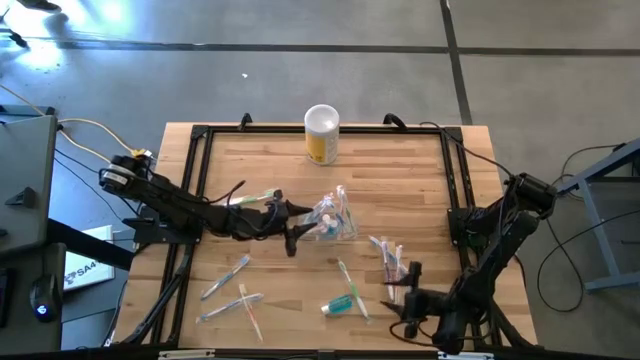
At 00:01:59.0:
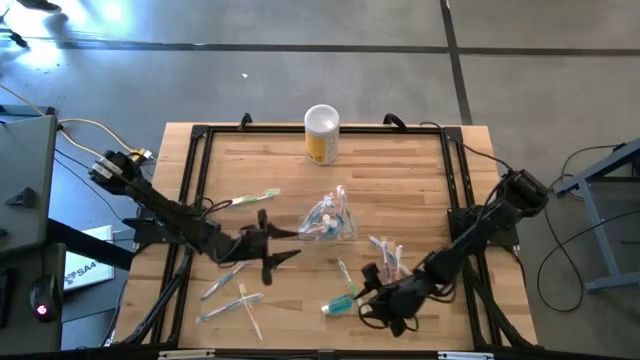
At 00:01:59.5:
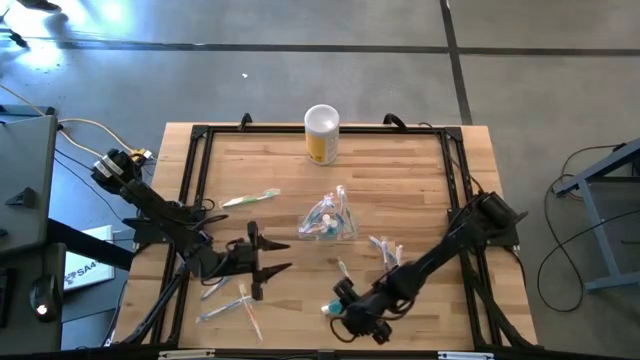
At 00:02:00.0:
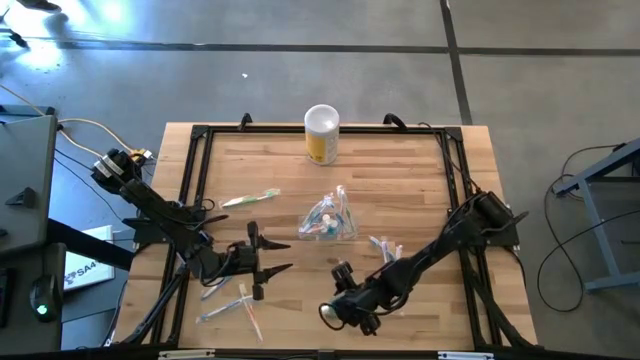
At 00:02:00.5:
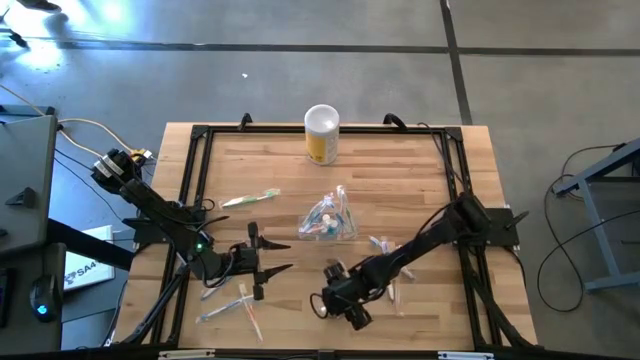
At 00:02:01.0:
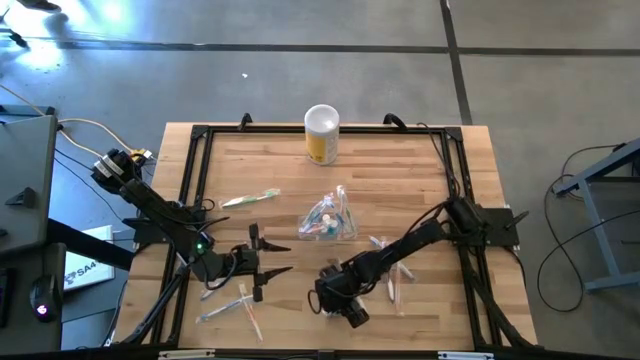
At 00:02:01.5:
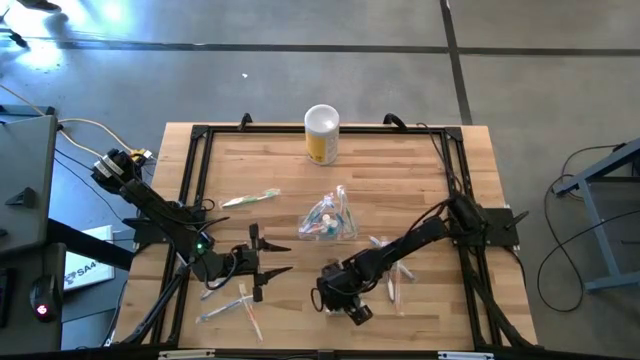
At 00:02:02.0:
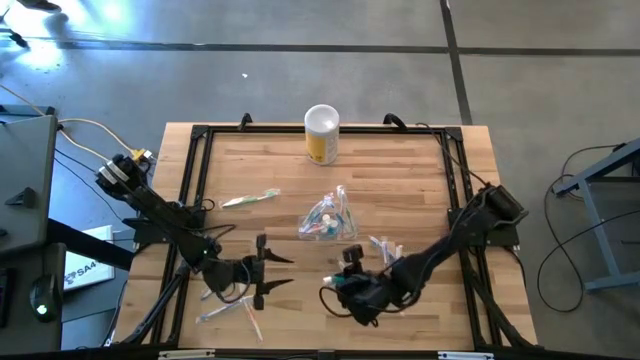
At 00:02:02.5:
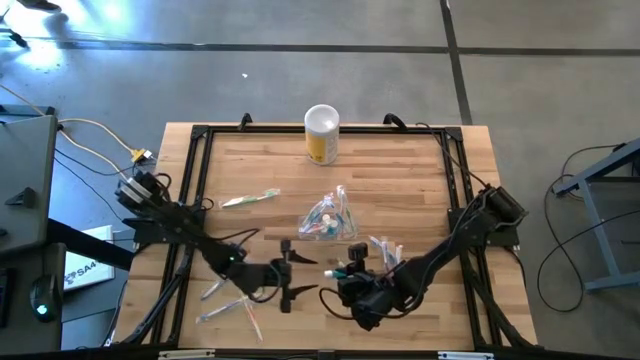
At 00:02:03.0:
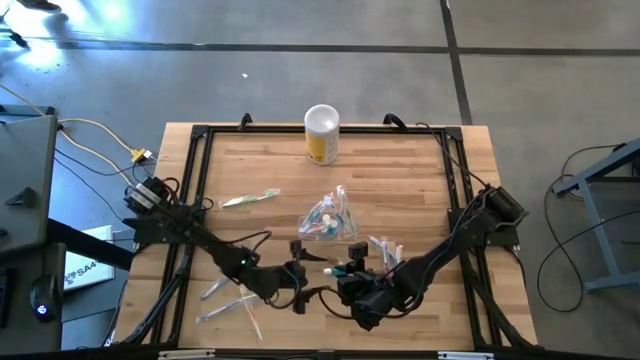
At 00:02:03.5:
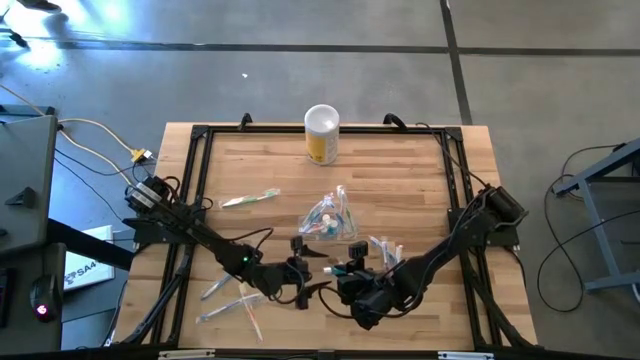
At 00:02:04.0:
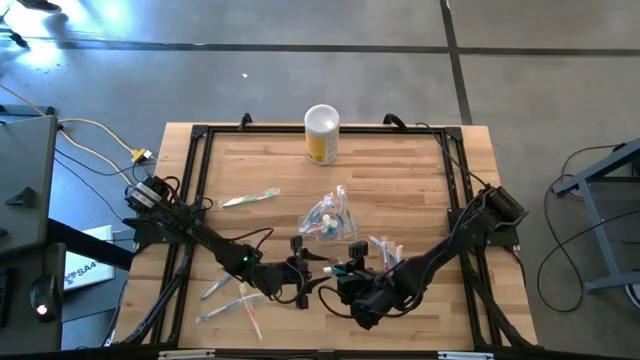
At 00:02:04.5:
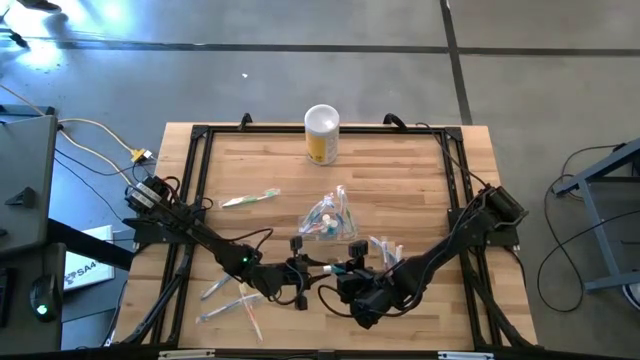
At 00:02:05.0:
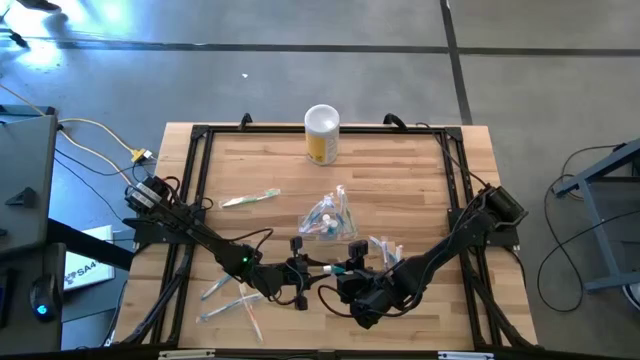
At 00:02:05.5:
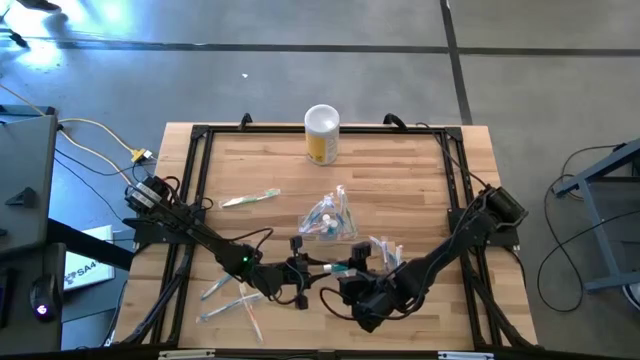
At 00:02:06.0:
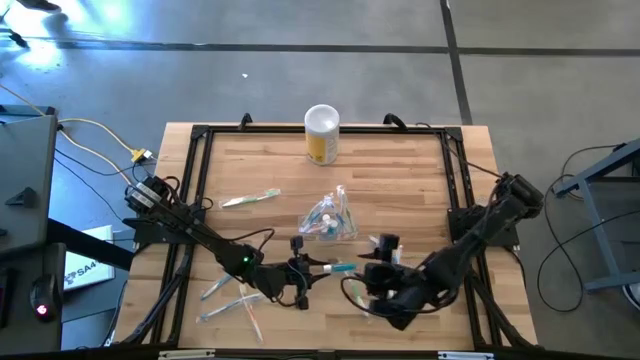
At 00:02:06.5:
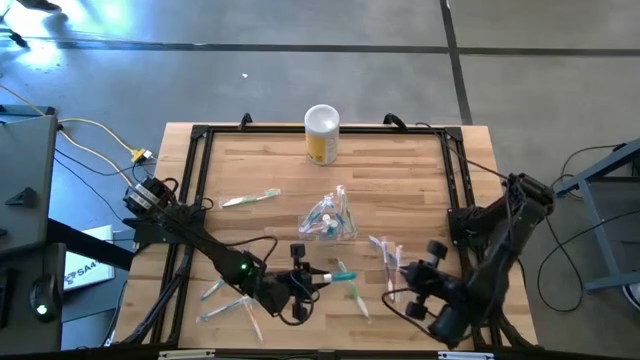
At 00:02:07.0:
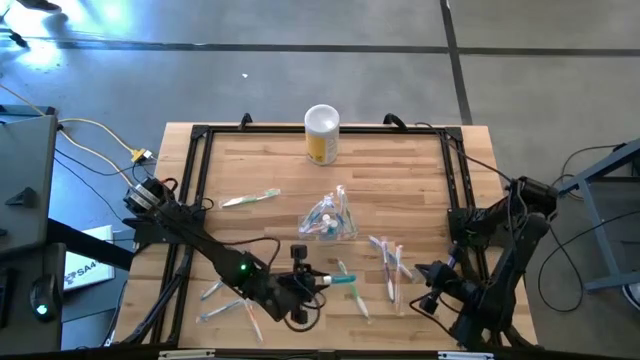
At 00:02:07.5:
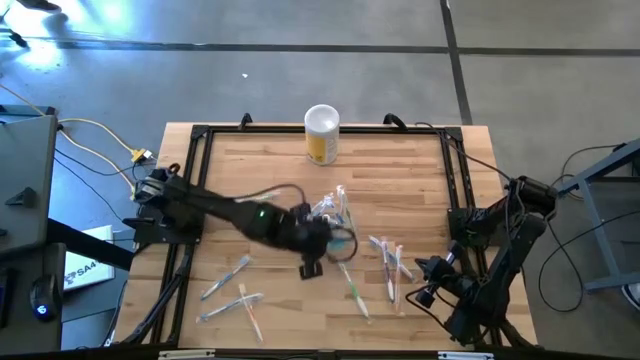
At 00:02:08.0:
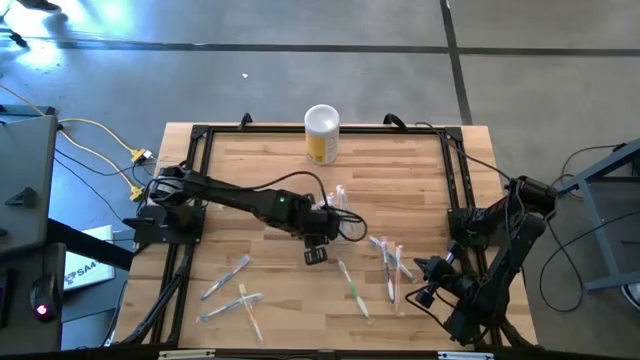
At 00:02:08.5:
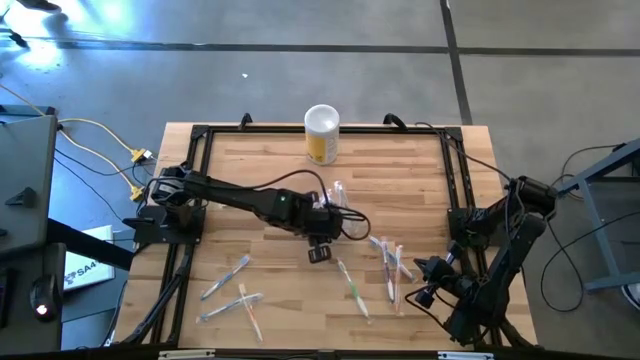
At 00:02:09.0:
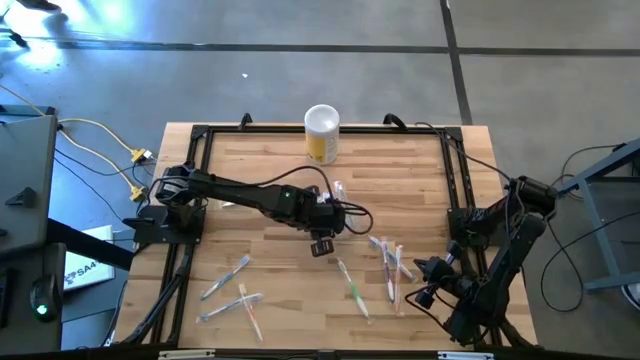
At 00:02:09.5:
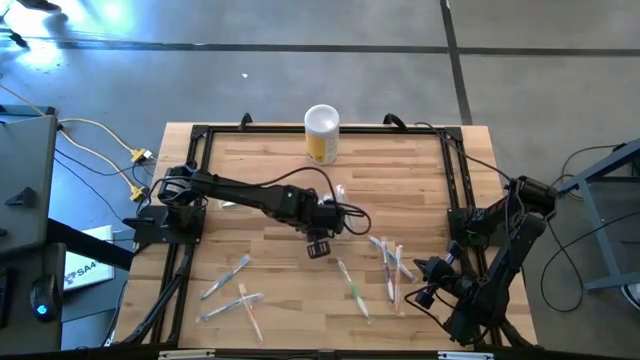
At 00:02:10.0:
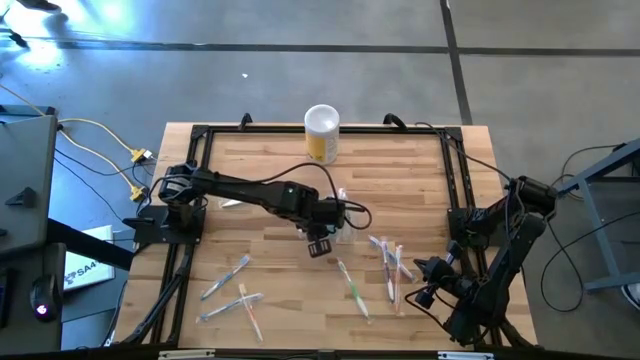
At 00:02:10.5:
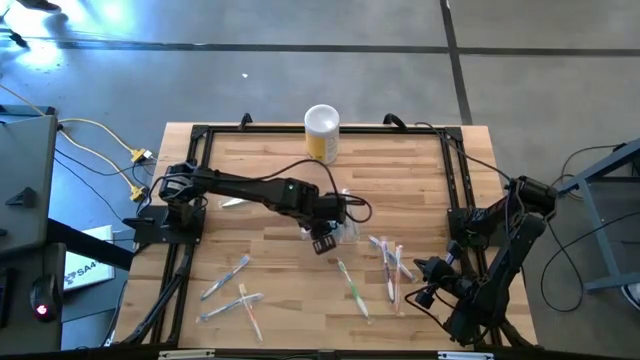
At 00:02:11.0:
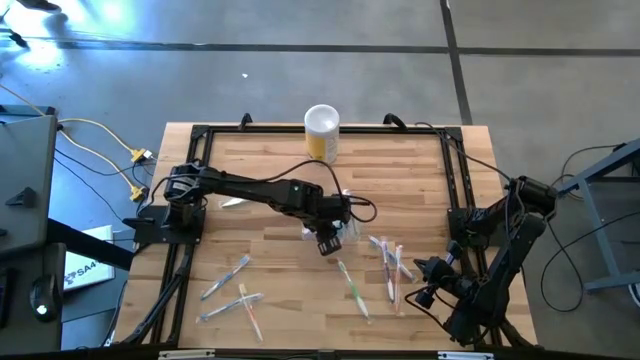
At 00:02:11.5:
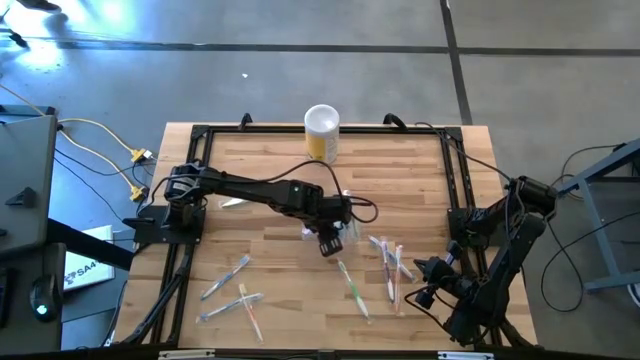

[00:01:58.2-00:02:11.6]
Task: Pick & Place toothbrushing station
Put the blue mouthwash into the middle part of the transparent organizer

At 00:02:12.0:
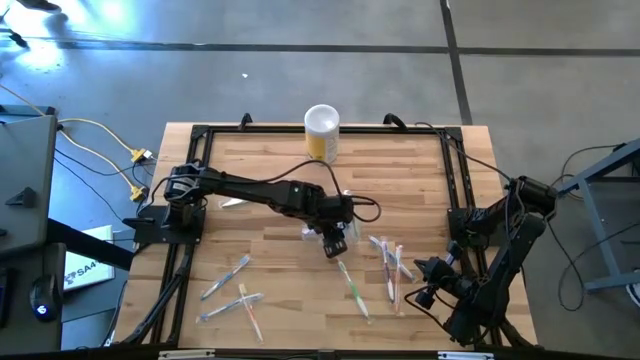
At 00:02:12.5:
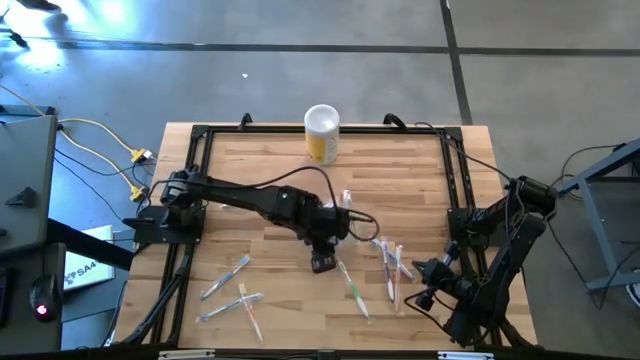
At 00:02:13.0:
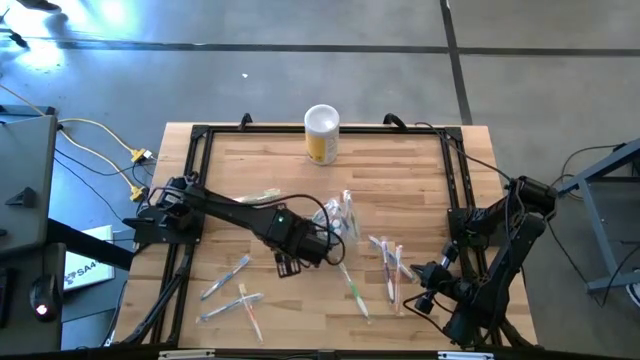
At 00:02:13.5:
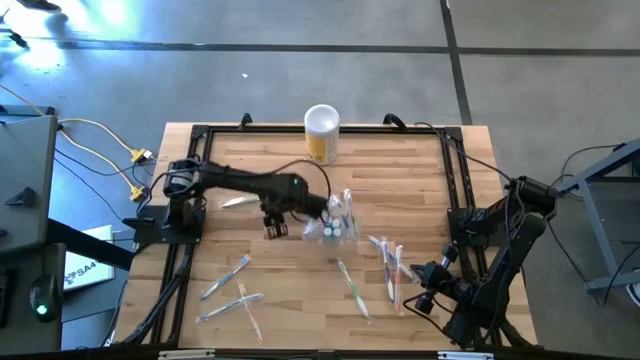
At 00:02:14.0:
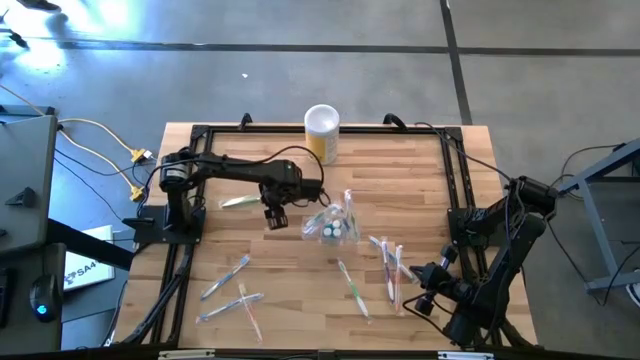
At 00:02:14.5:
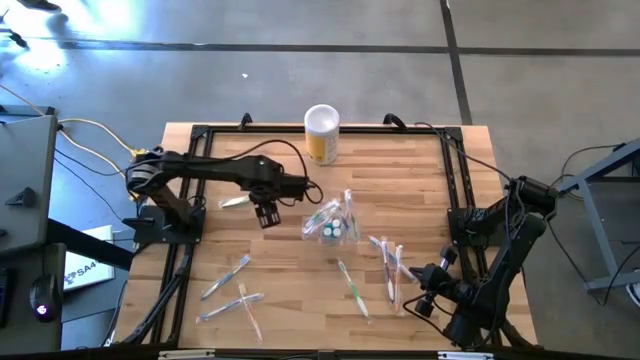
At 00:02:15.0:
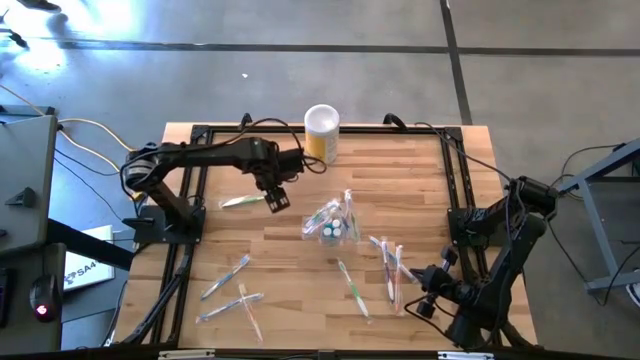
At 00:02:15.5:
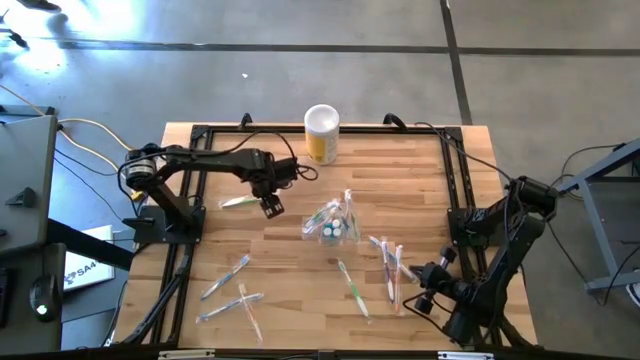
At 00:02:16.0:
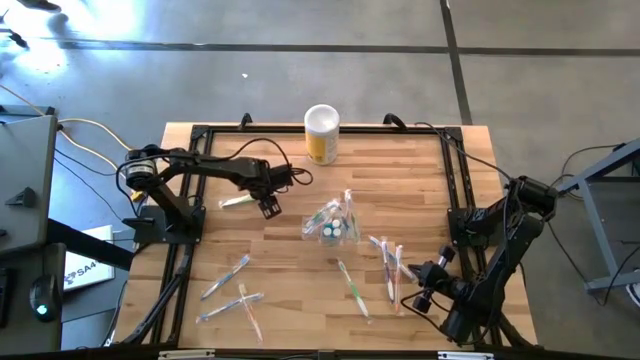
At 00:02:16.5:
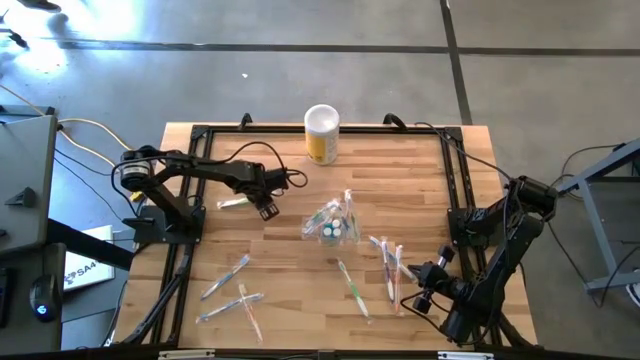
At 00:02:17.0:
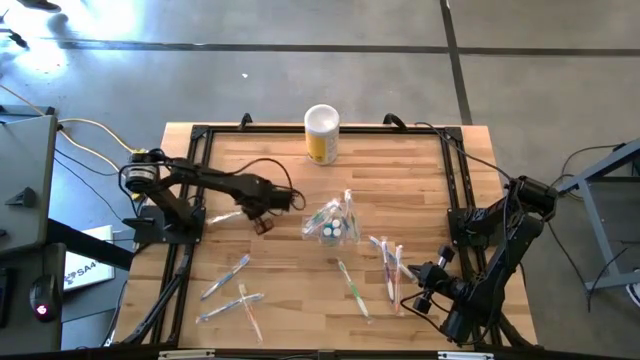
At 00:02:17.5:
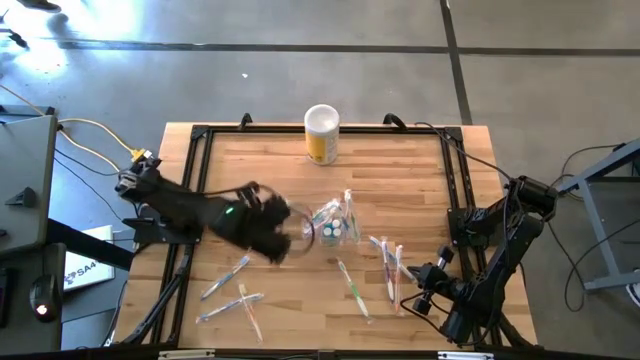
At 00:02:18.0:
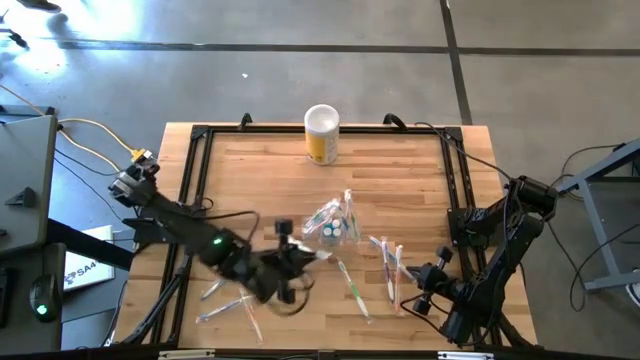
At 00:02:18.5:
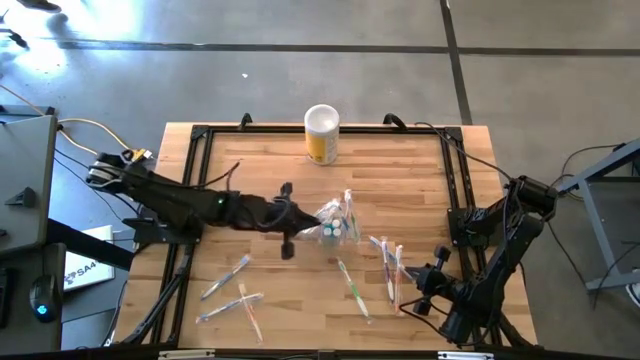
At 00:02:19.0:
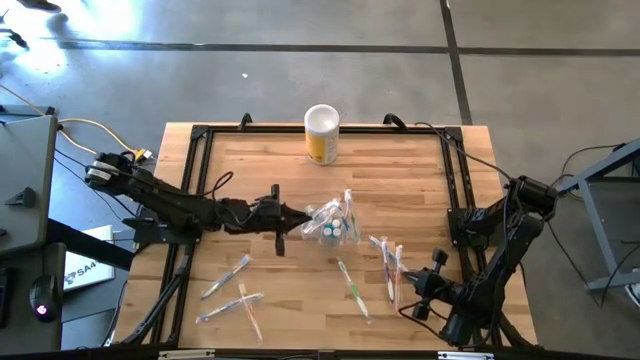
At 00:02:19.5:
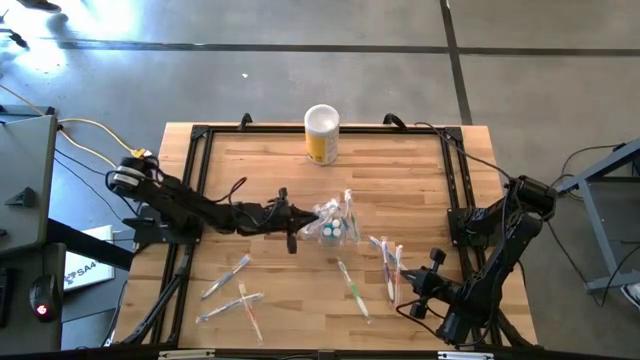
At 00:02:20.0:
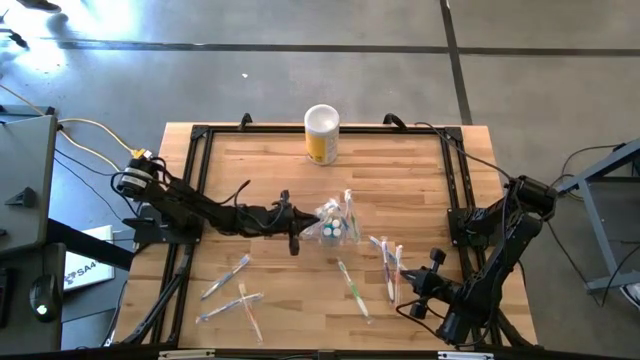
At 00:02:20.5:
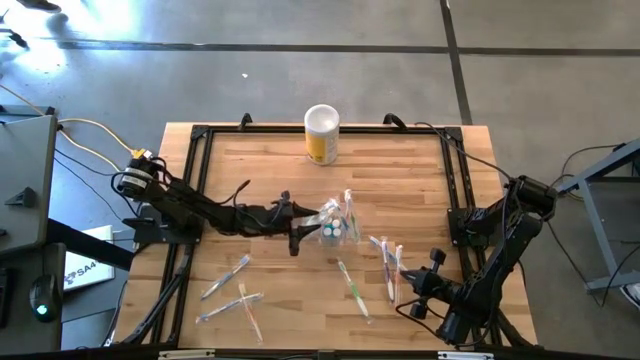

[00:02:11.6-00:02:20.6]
Put the green toothbrush into the left part of the transparent organizer
